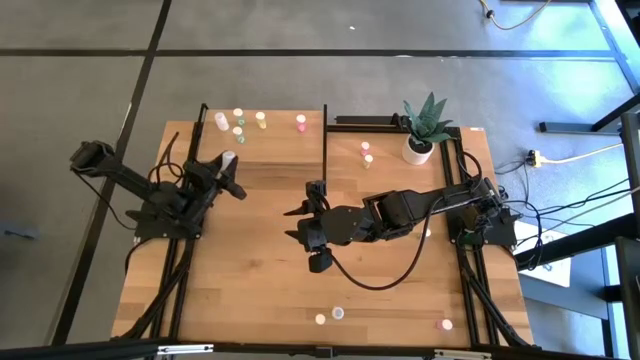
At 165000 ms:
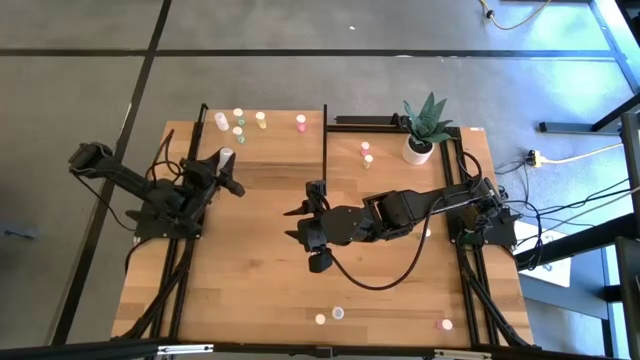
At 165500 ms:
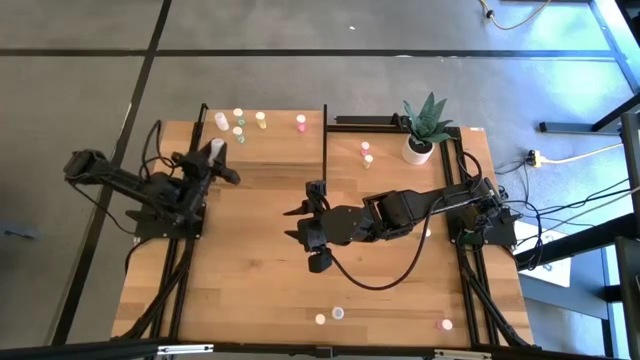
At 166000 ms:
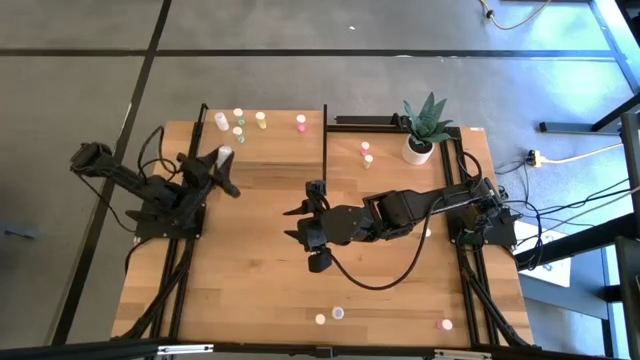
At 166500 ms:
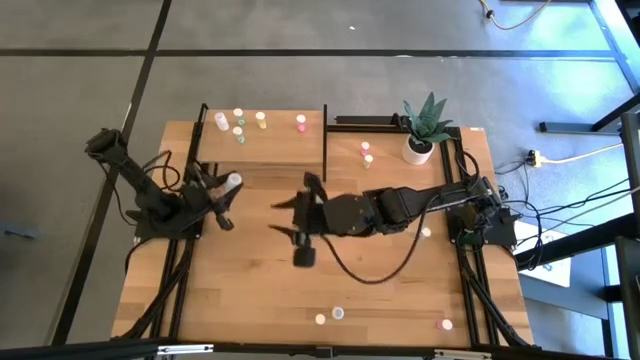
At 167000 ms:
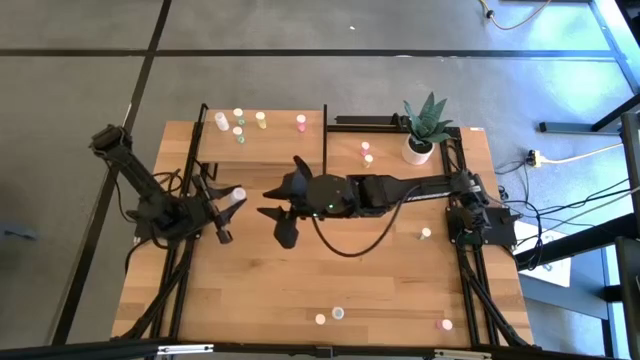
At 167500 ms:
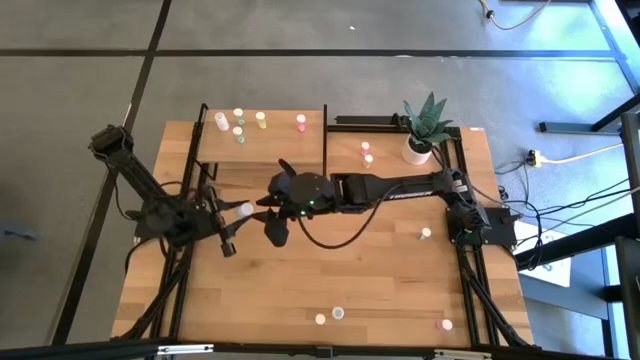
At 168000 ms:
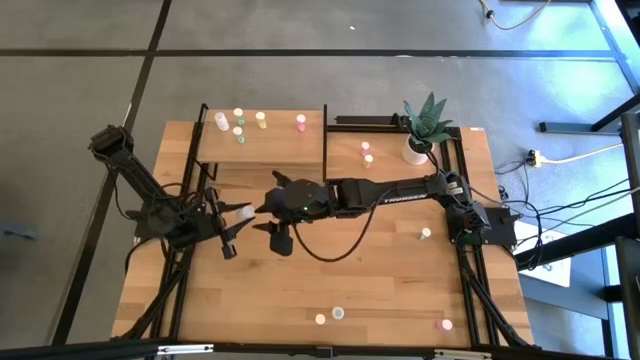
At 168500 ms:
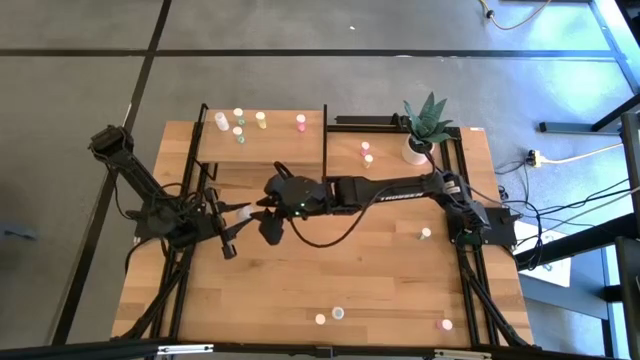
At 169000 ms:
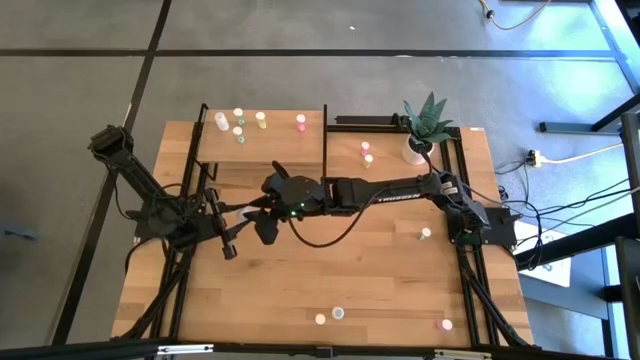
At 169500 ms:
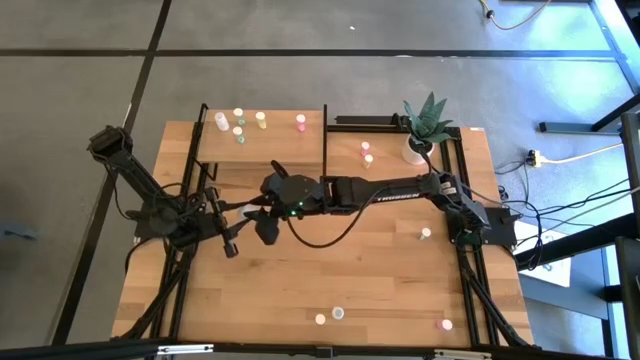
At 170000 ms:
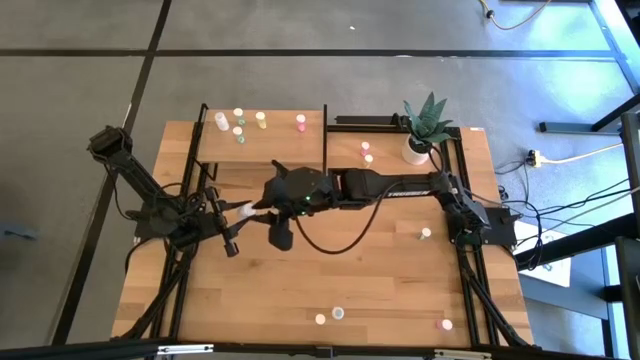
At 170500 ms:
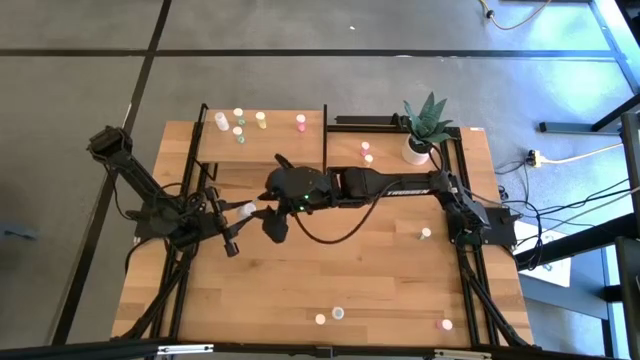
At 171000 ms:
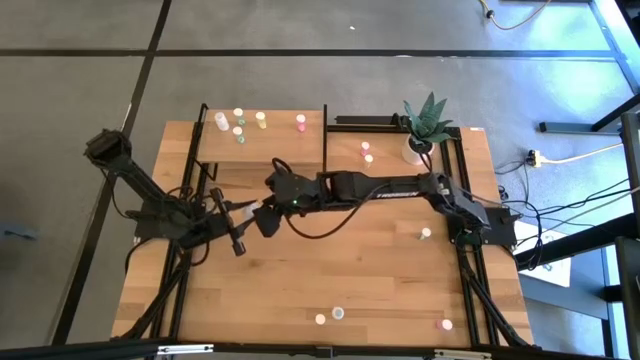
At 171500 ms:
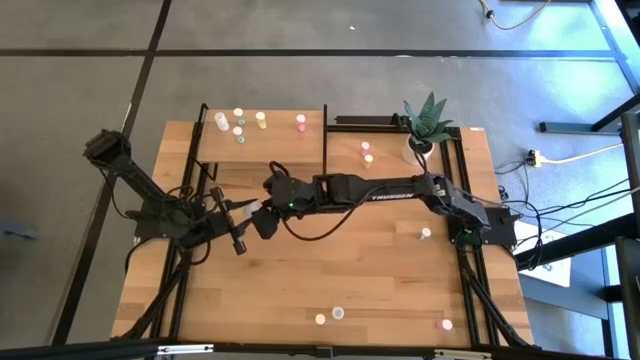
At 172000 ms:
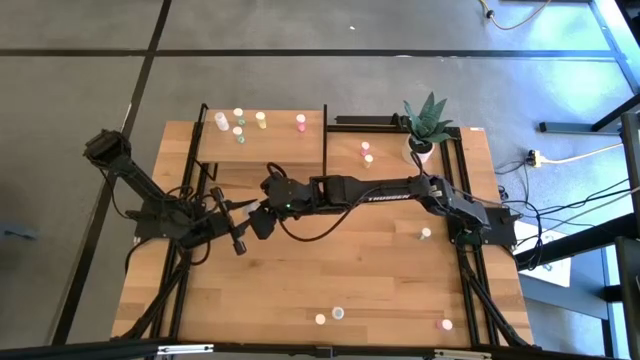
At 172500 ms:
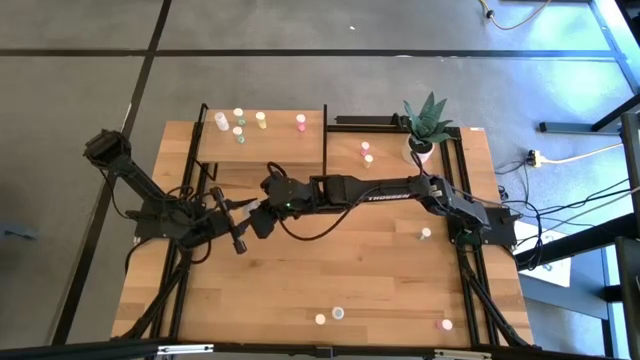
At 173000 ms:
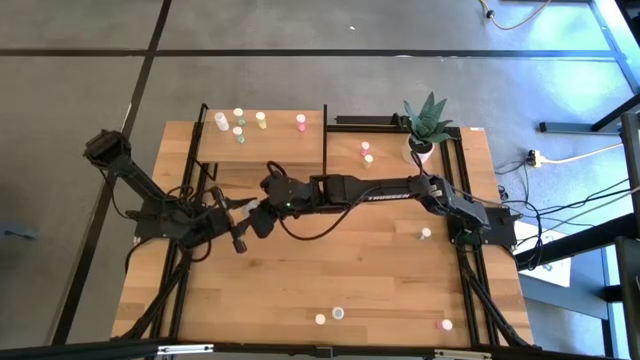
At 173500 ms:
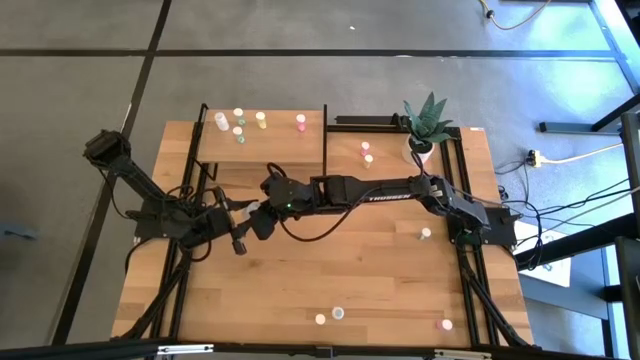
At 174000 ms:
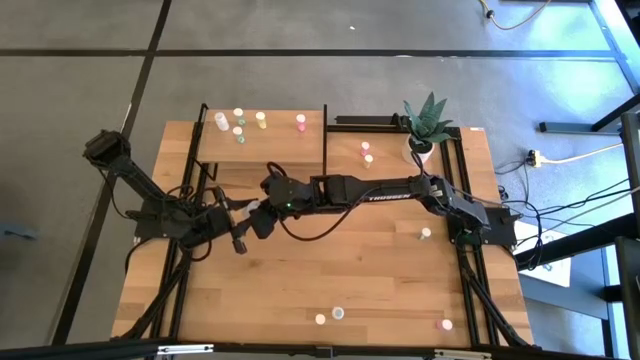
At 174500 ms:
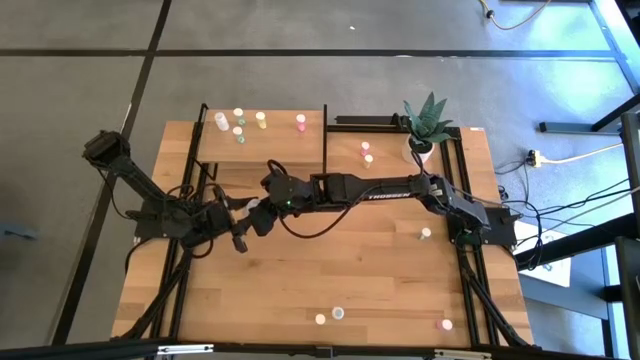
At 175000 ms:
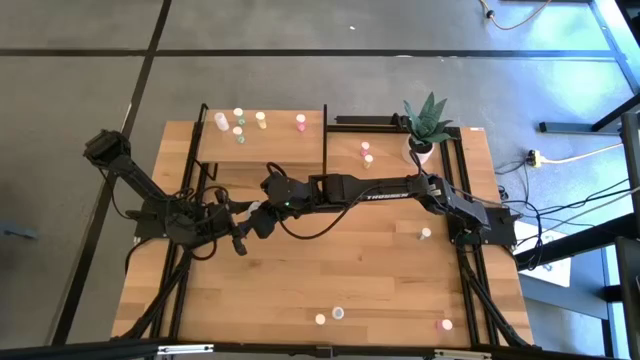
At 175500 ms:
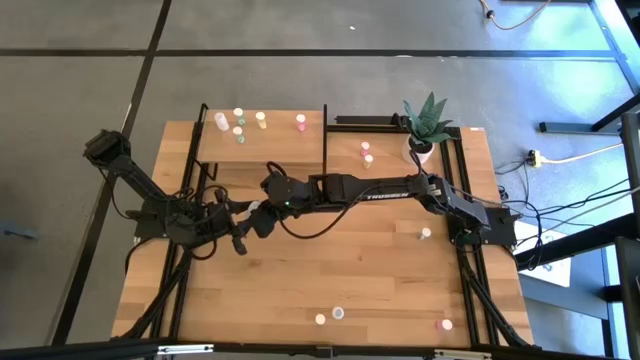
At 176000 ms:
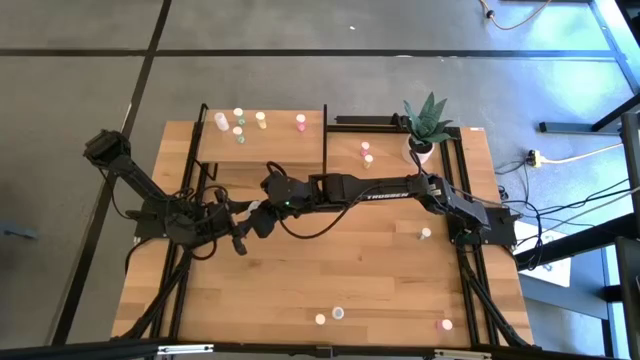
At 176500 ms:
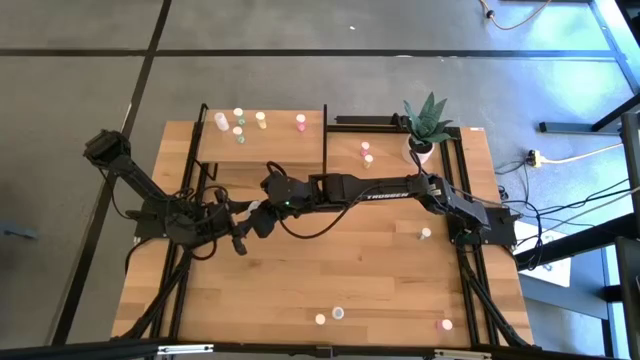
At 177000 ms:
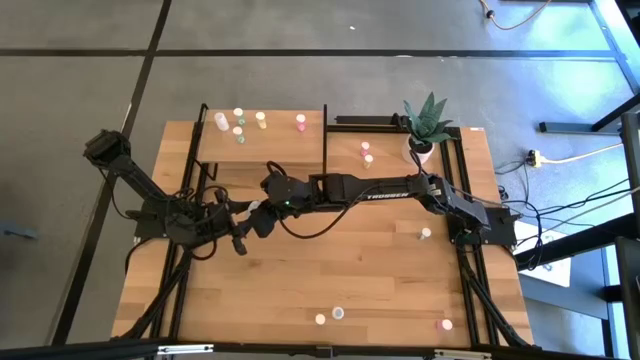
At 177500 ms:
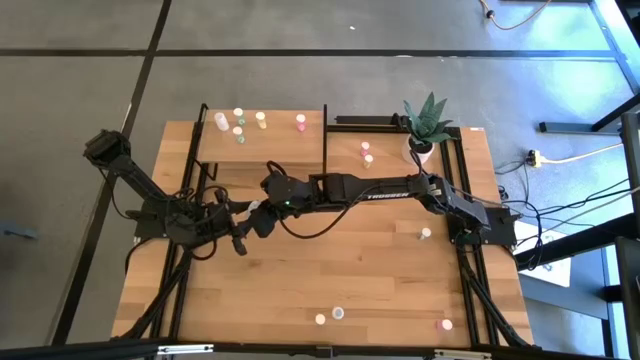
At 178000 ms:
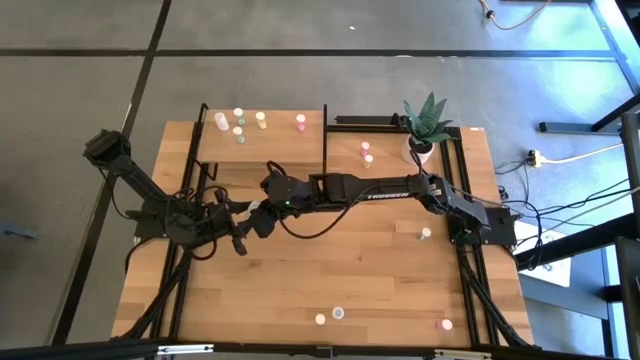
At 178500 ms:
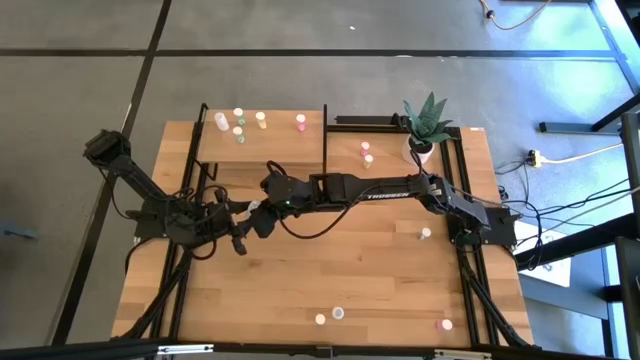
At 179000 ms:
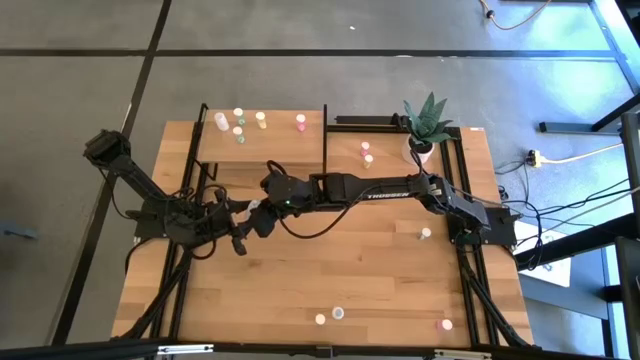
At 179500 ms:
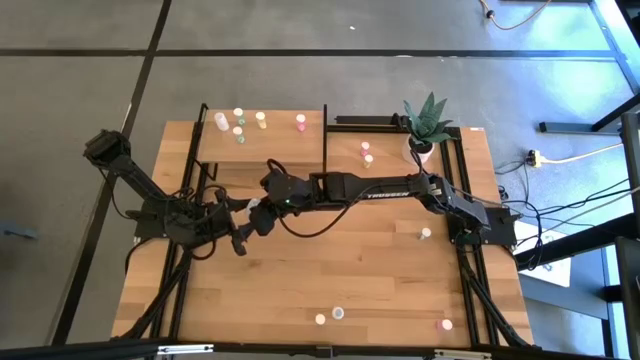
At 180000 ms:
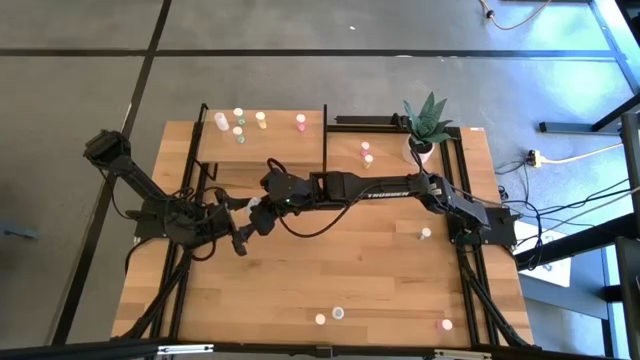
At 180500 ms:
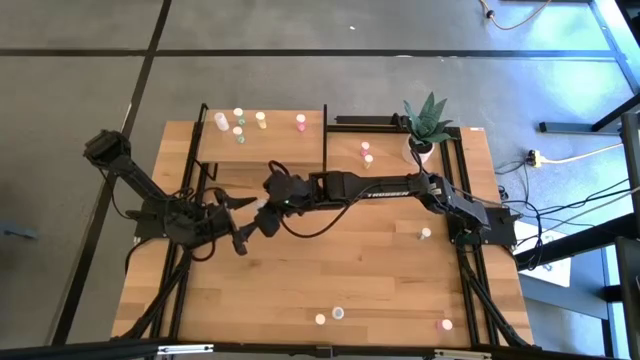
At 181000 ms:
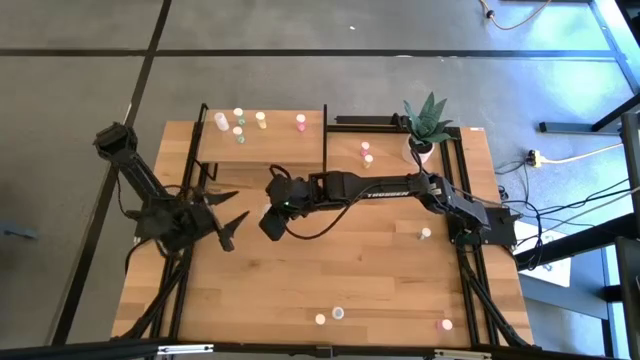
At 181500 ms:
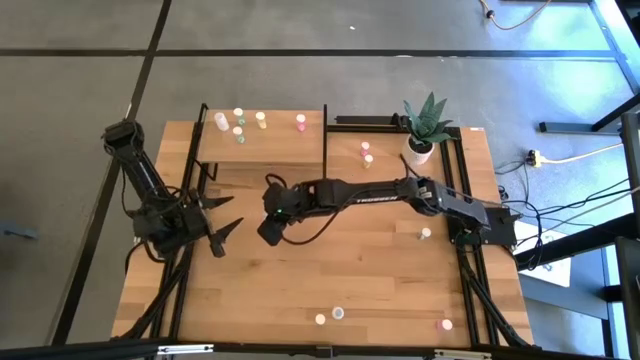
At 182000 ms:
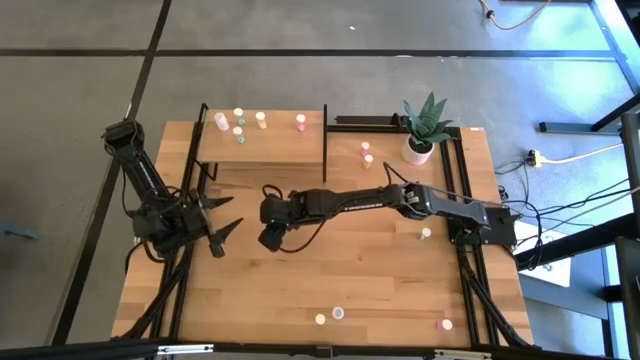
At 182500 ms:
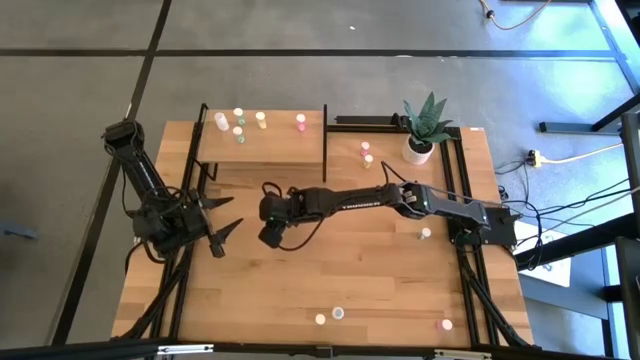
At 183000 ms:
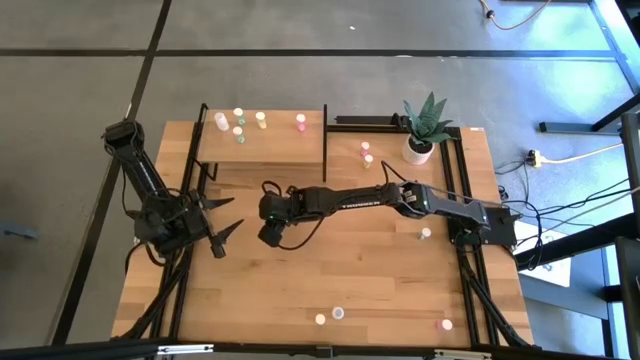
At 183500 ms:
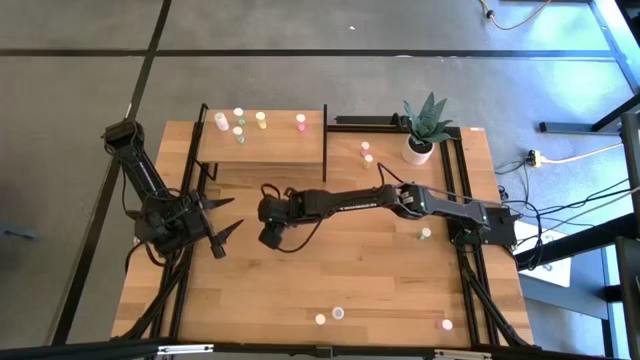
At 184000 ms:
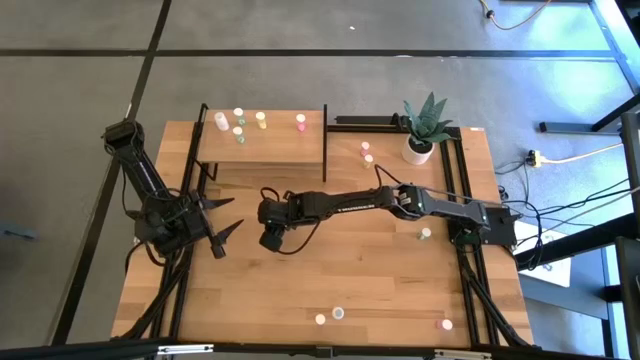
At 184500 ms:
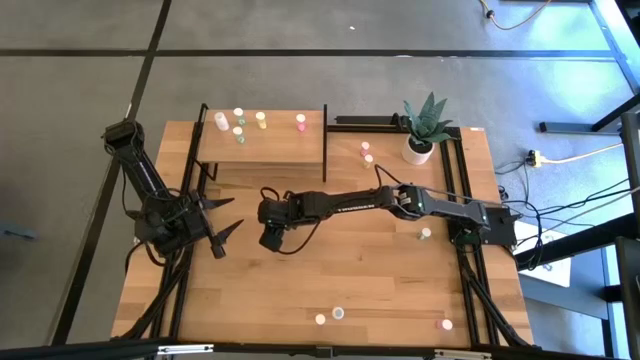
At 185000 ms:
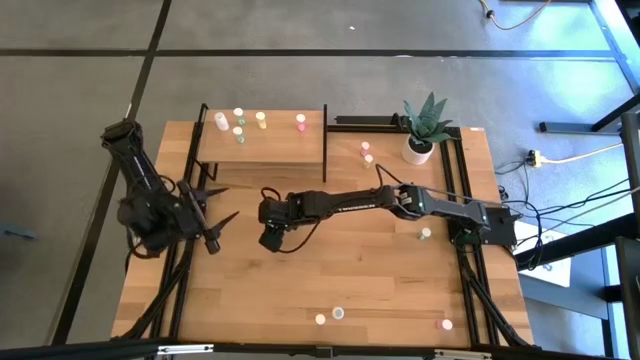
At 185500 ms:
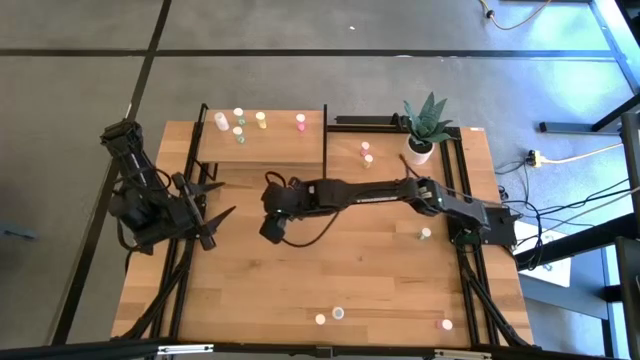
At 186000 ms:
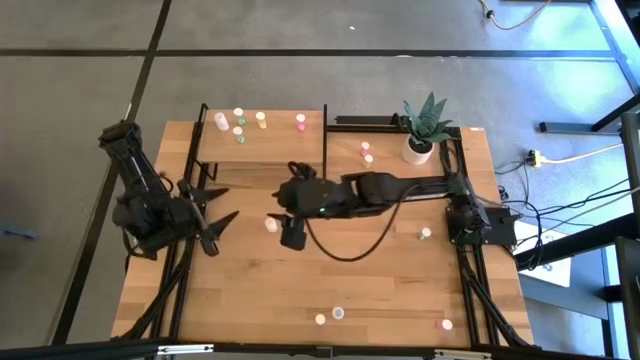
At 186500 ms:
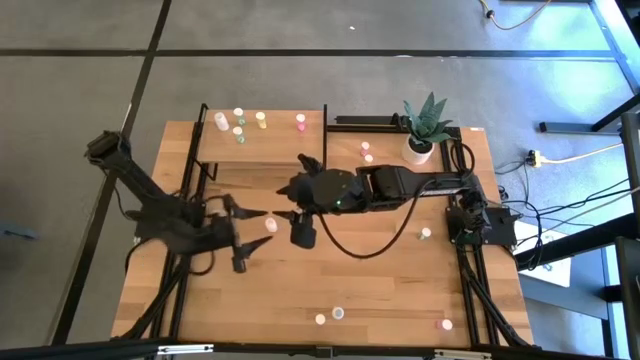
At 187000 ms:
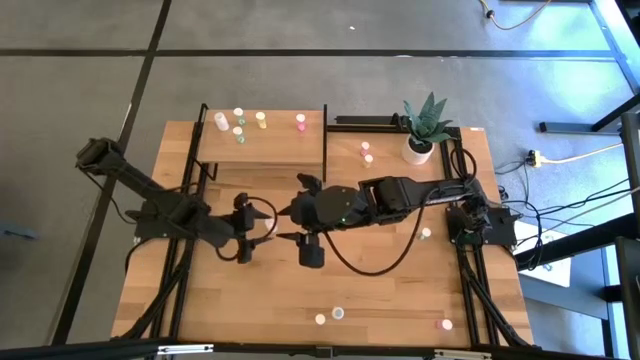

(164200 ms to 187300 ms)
Task: Pick and place medicine bottles onto shelf by color
Put the top white pill bottle aligned with the other white pill bottle on the shelf
